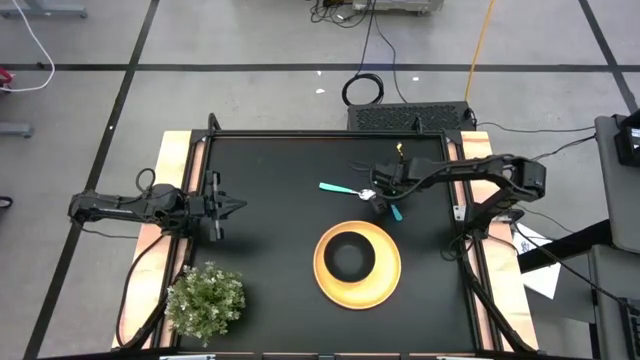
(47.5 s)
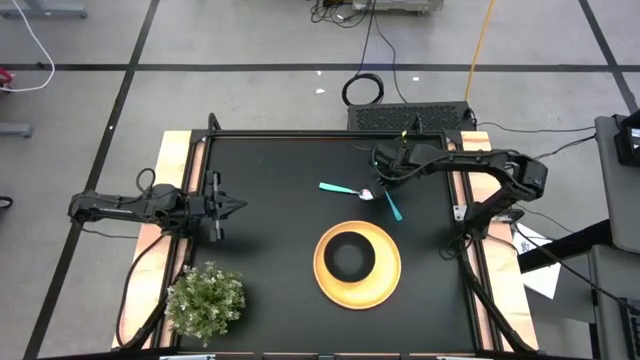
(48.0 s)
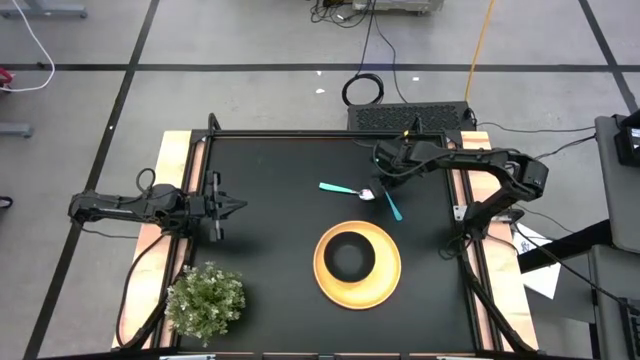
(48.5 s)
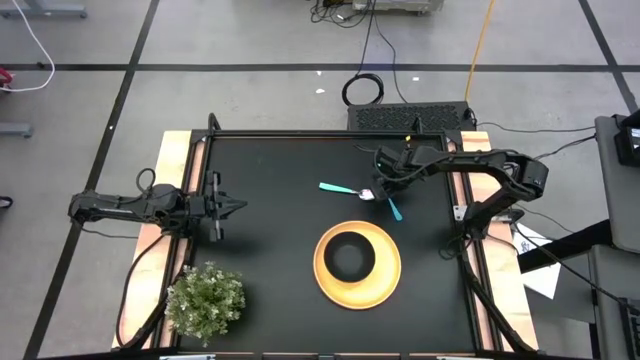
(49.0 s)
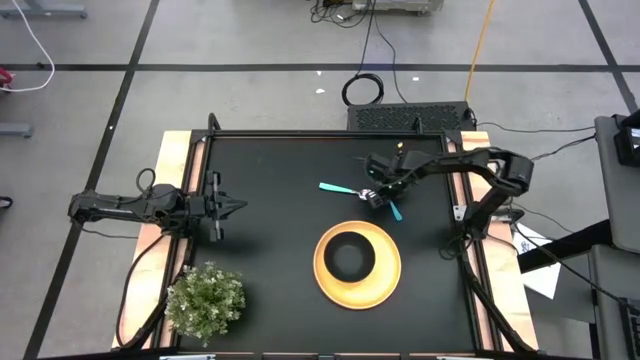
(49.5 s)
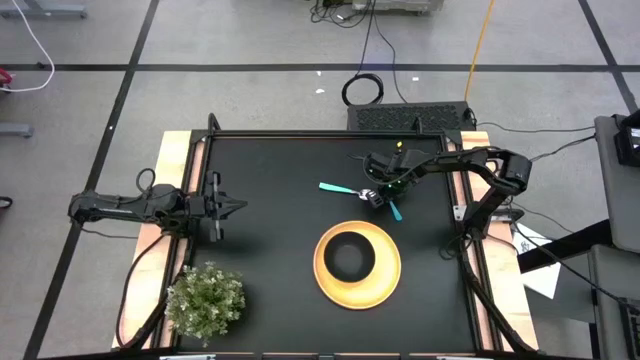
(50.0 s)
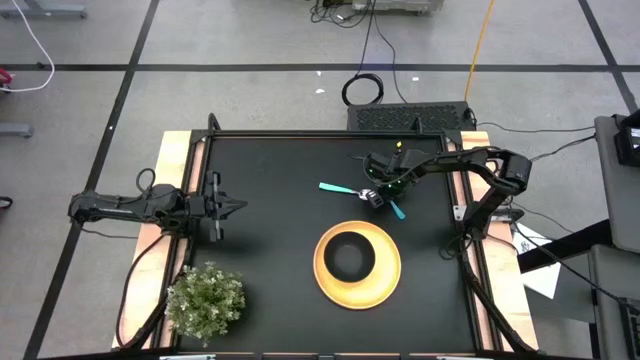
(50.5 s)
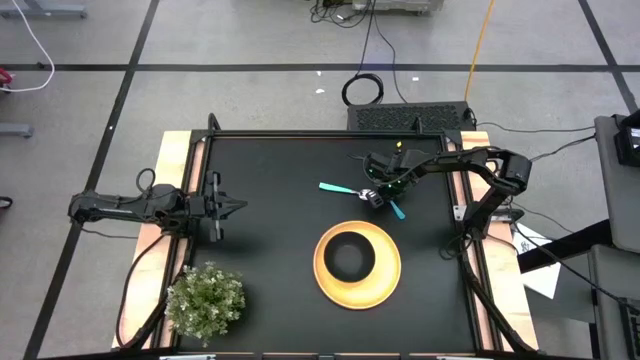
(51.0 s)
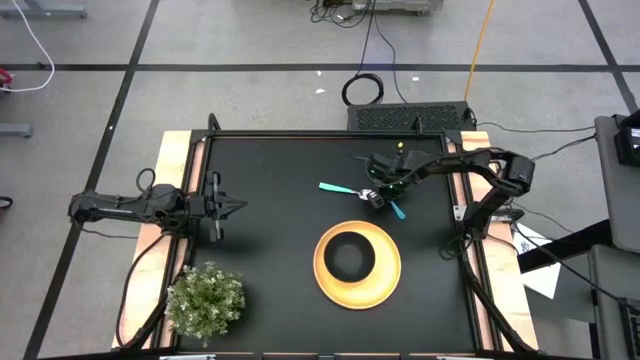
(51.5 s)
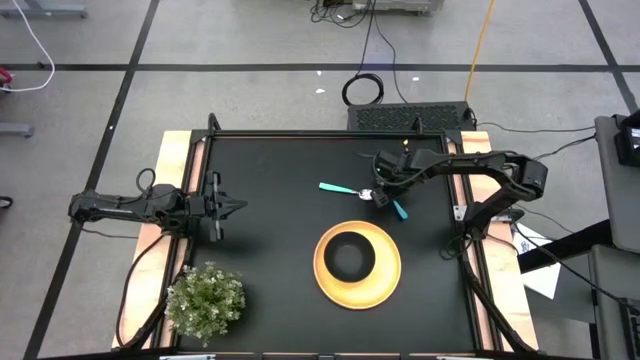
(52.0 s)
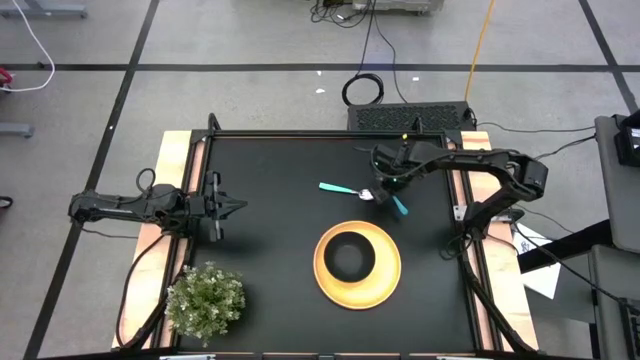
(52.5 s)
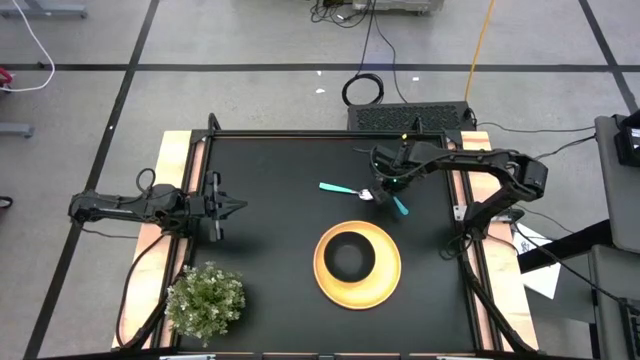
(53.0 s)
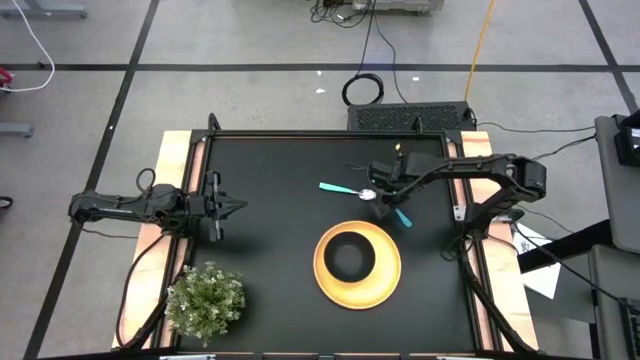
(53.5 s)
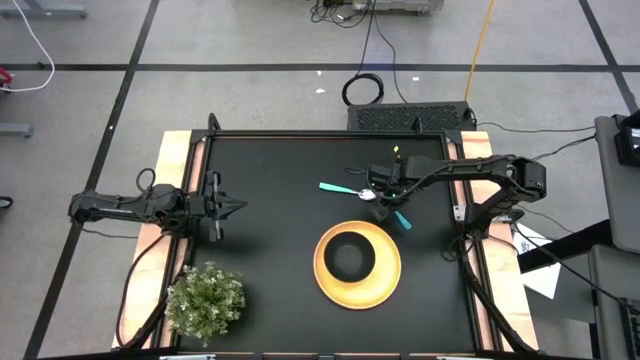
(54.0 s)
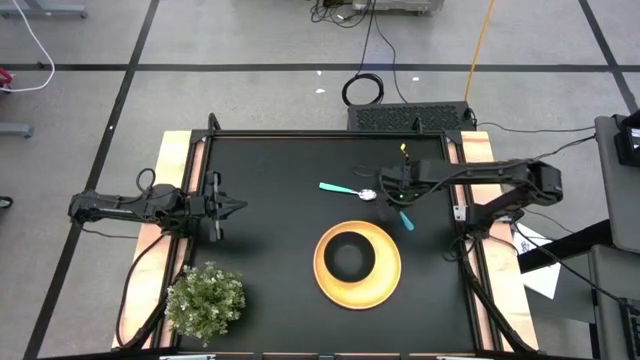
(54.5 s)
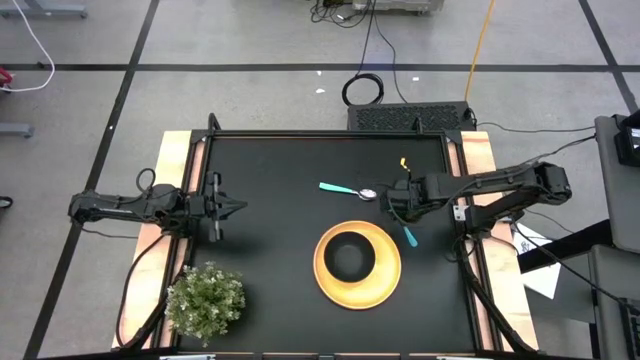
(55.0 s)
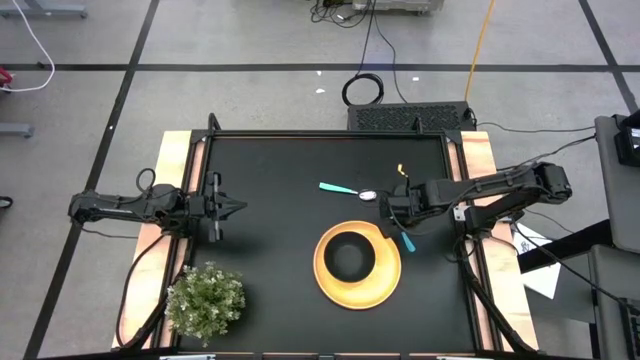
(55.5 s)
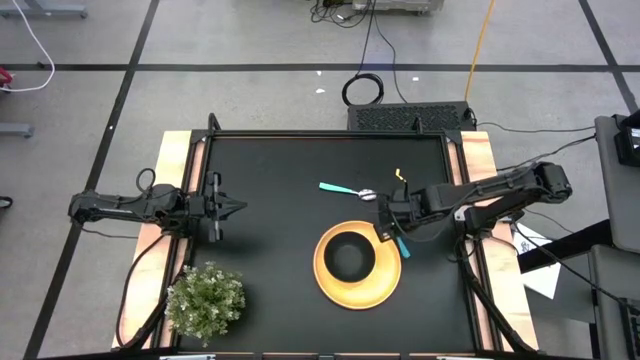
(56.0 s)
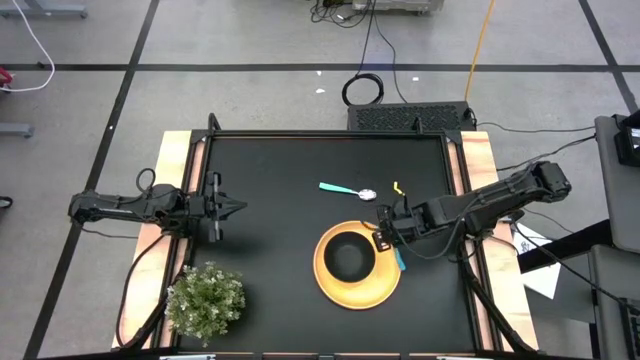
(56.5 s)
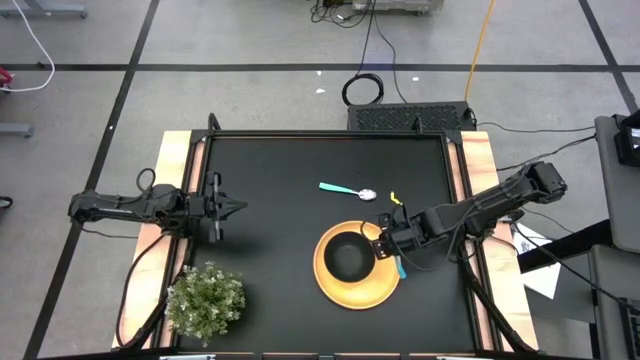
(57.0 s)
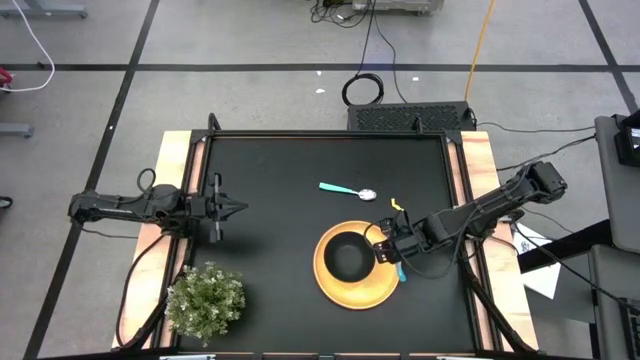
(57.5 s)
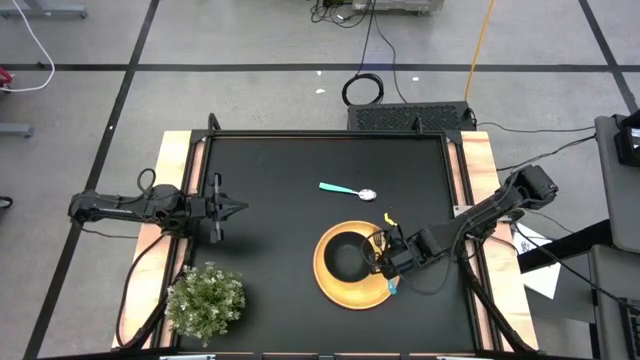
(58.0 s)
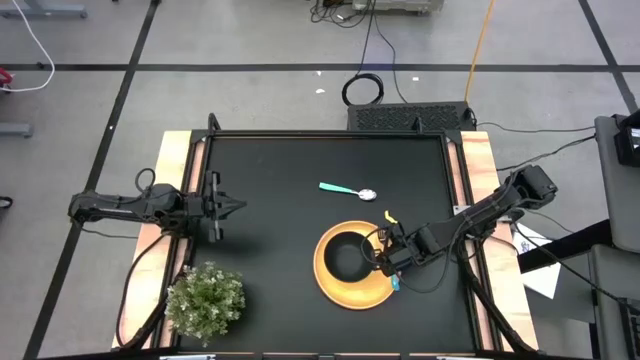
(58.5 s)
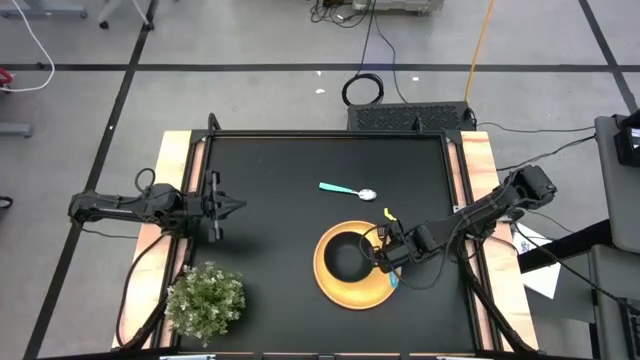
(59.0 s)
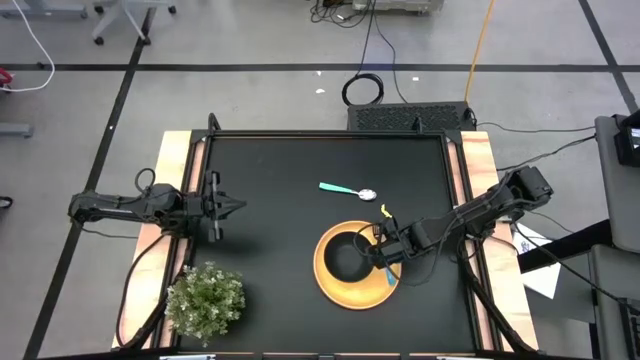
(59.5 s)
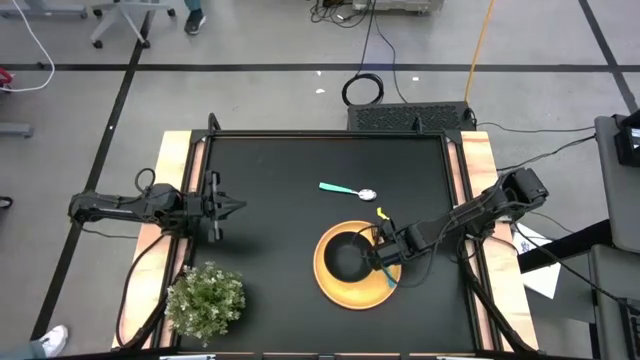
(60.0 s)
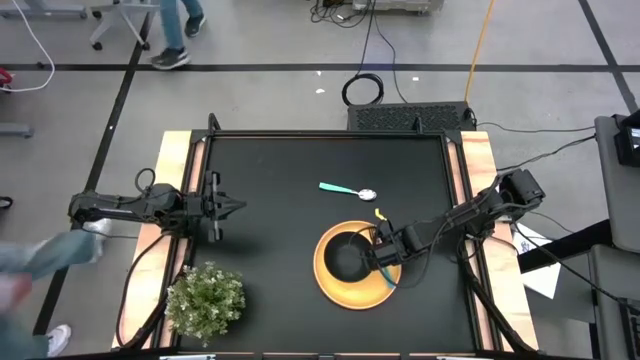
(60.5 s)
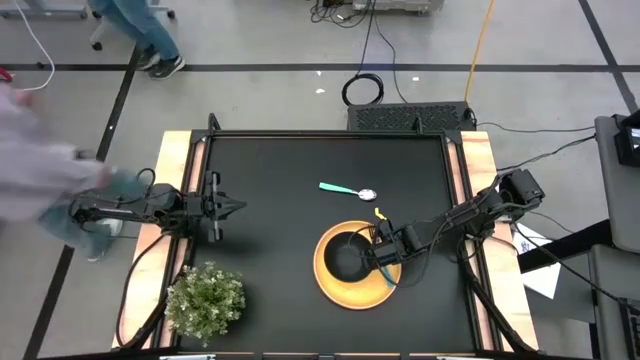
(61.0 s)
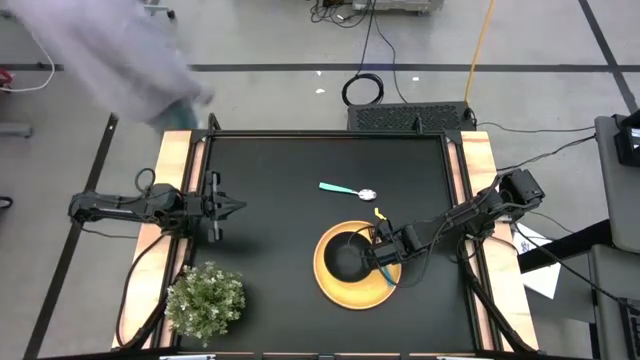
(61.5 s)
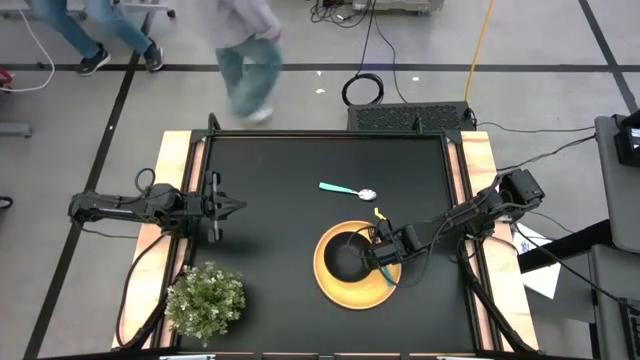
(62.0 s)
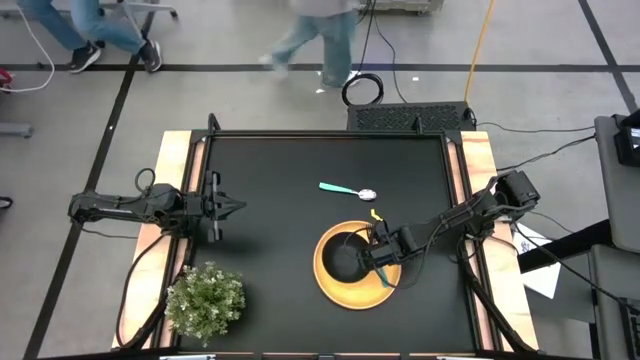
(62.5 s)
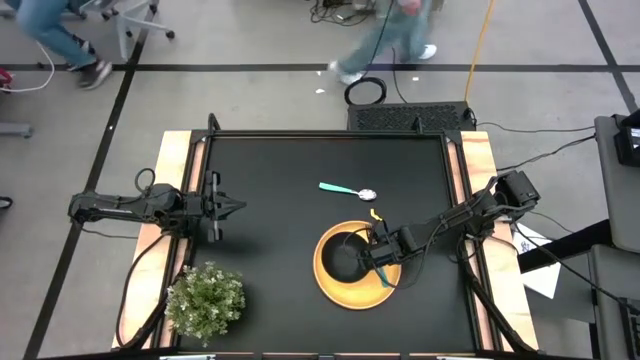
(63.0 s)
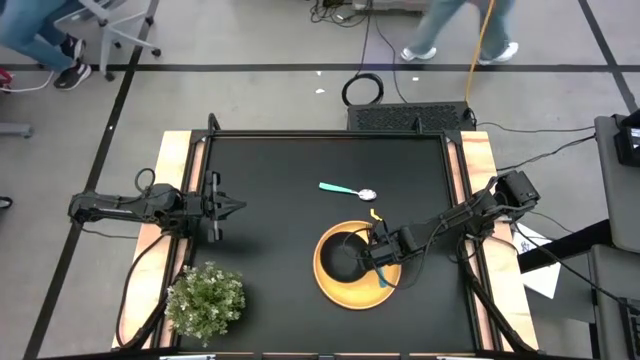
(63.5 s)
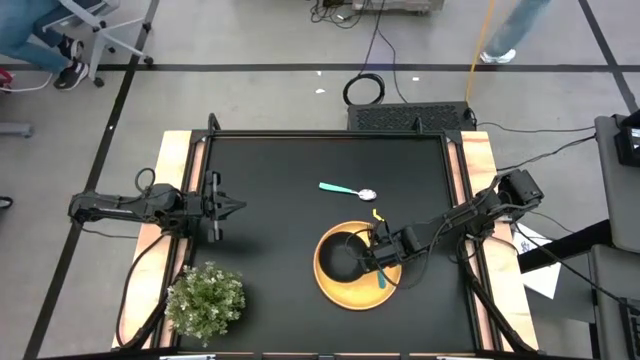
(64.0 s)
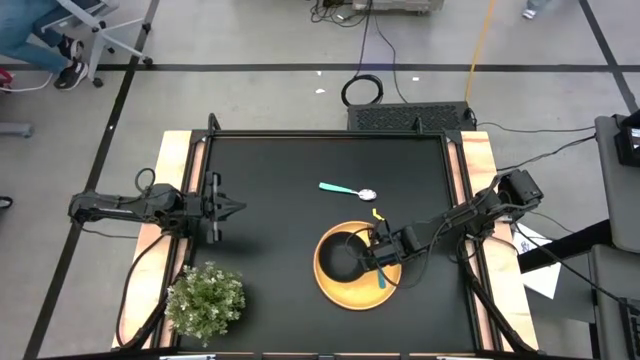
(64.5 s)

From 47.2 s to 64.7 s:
Task: Set table place
Put the blue fork to the right of the black bowl on the yellow plate

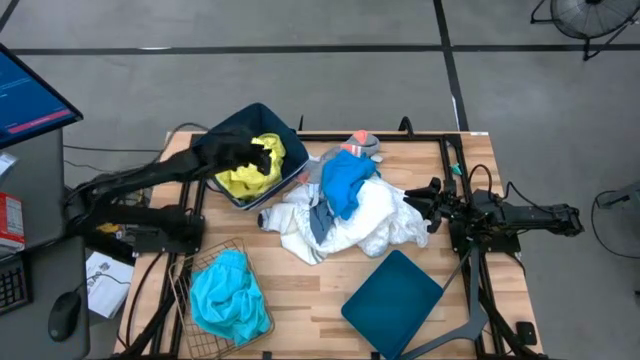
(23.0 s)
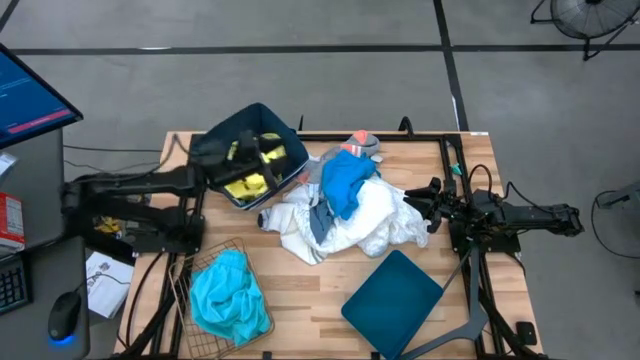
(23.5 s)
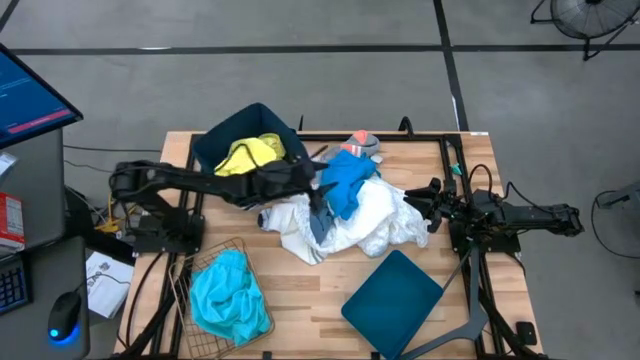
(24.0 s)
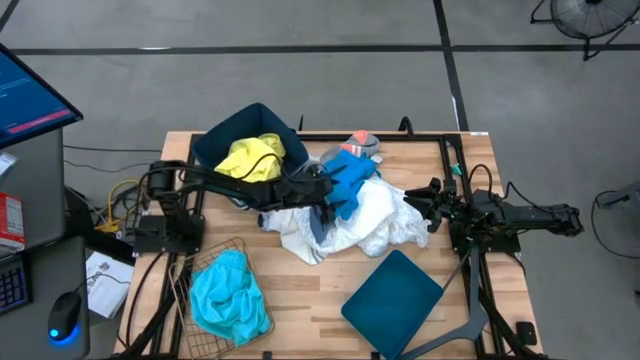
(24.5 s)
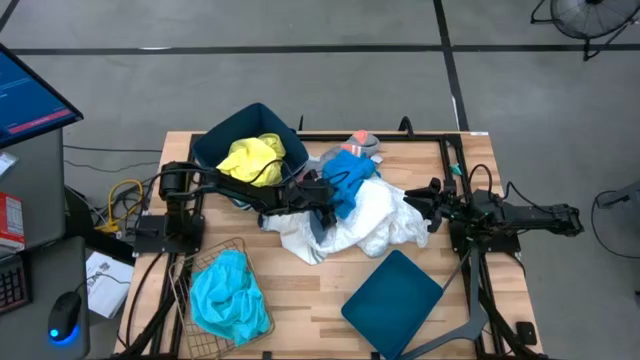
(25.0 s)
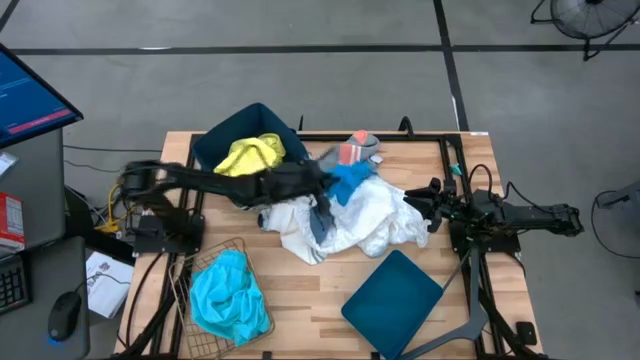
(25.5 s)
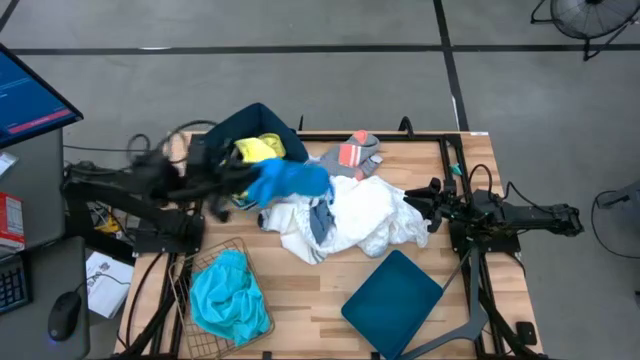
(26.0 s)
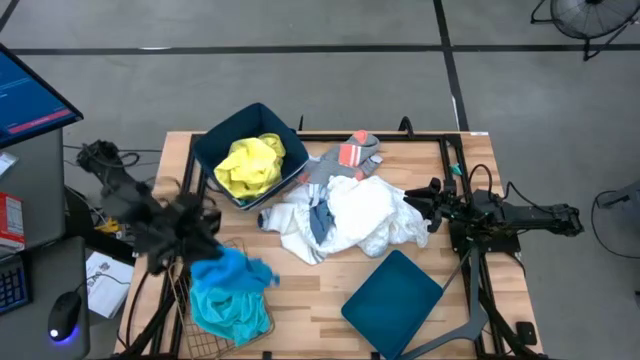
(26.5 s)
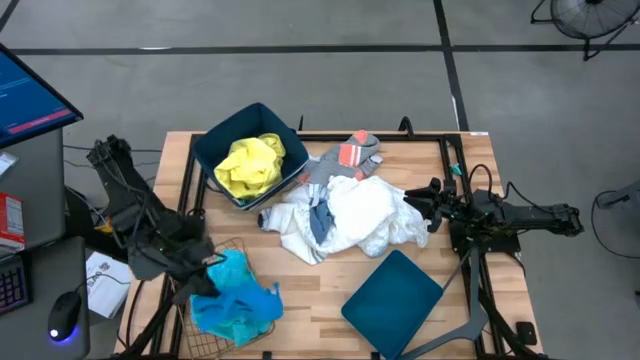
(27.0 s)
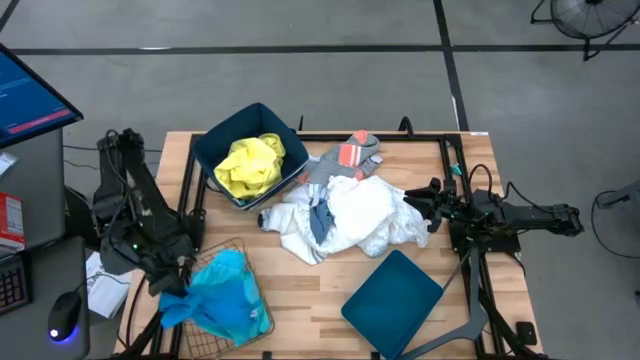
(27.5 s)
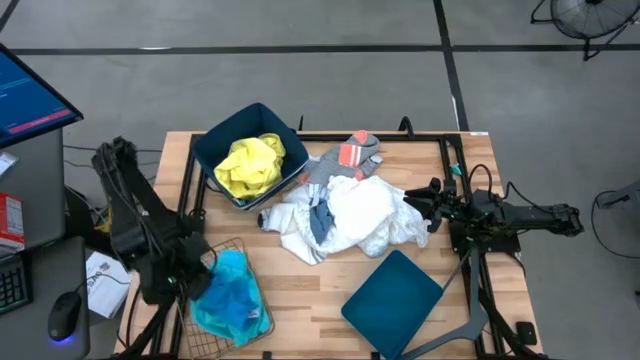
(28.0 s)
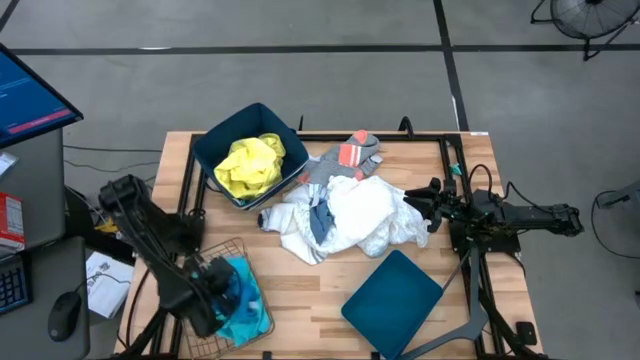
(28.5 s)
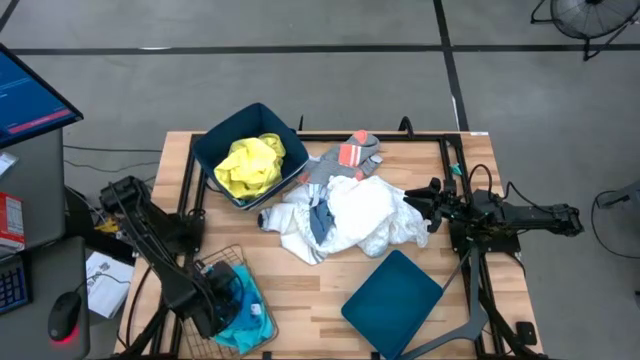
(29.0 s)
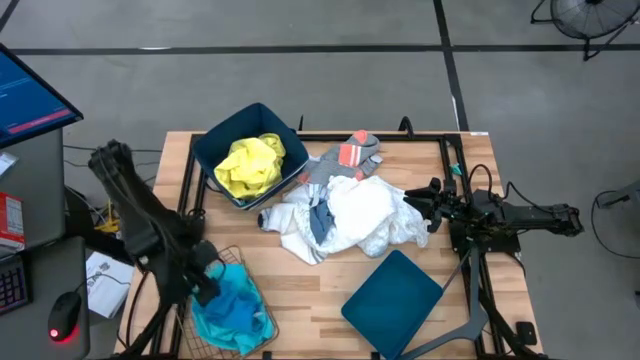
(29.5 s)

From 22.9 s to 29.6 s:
Task: Pick & Place Cloths
Put the blue short into the wire basket
